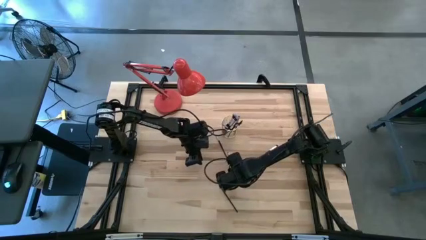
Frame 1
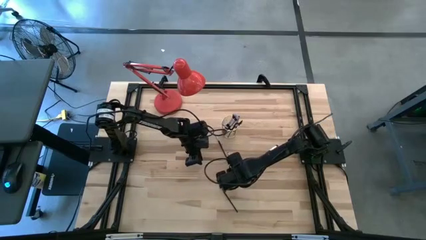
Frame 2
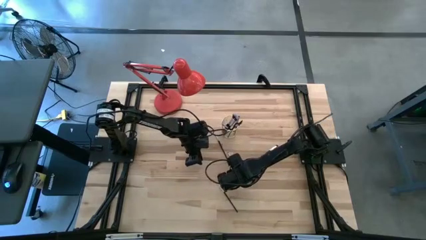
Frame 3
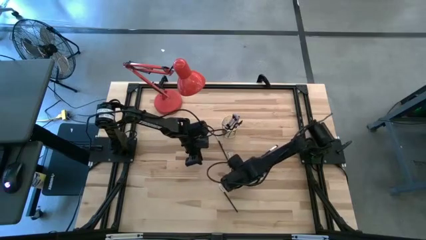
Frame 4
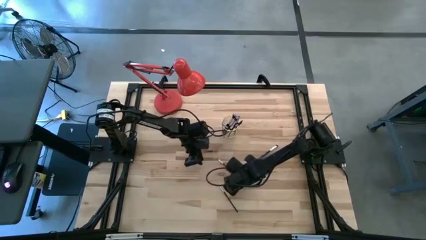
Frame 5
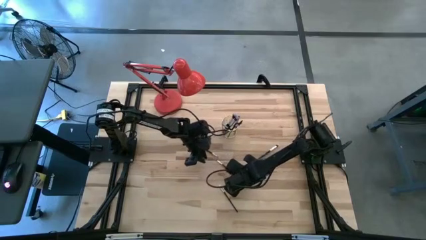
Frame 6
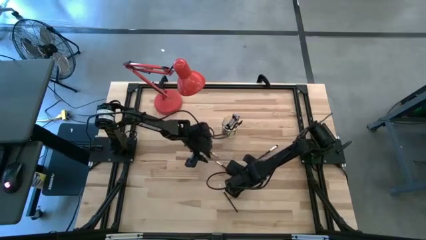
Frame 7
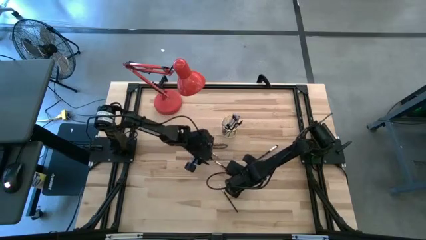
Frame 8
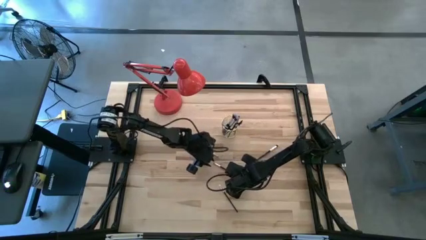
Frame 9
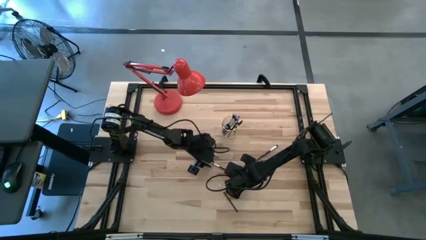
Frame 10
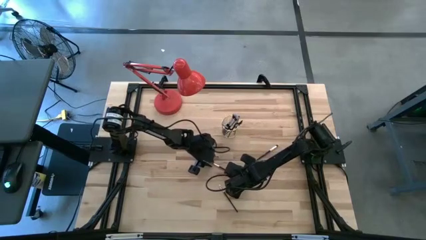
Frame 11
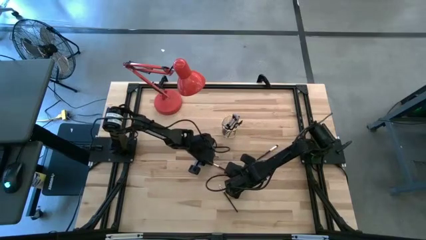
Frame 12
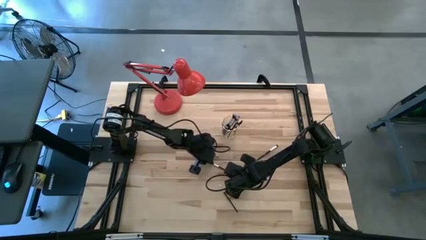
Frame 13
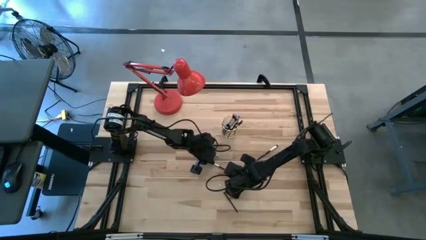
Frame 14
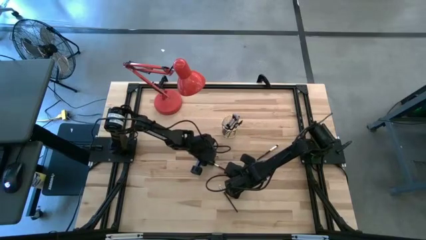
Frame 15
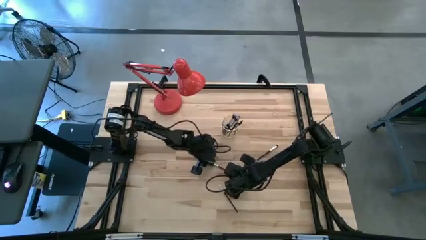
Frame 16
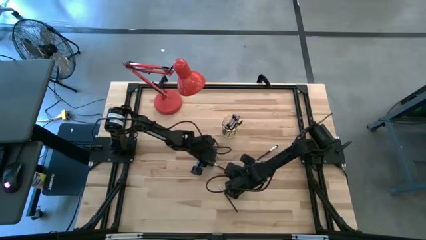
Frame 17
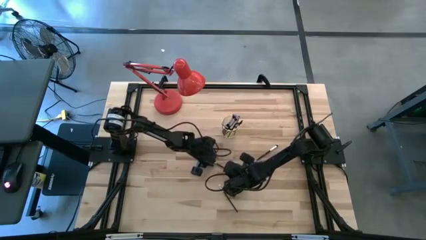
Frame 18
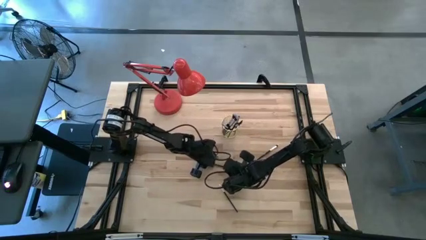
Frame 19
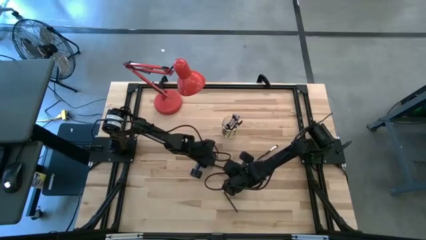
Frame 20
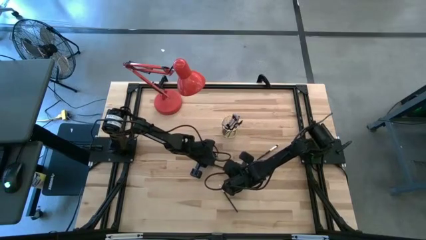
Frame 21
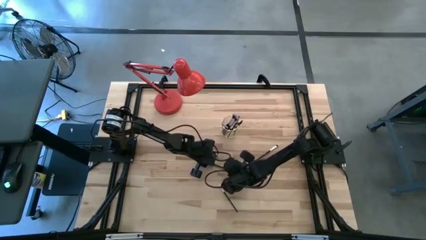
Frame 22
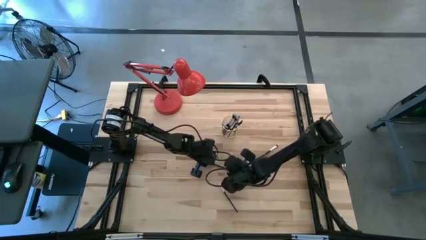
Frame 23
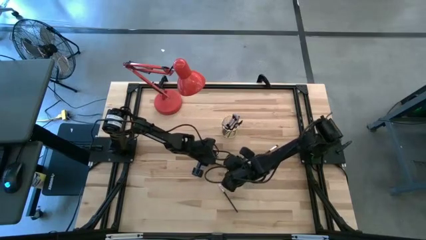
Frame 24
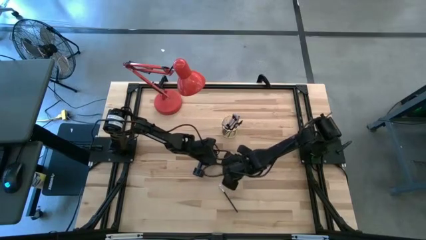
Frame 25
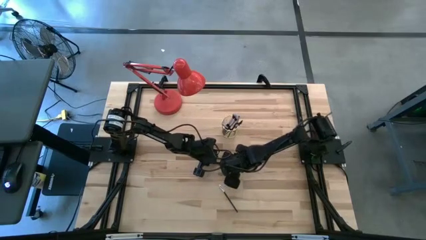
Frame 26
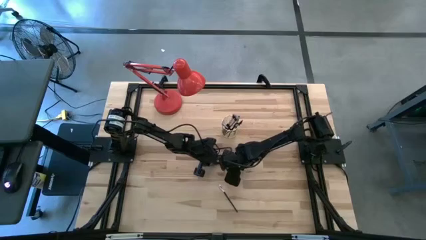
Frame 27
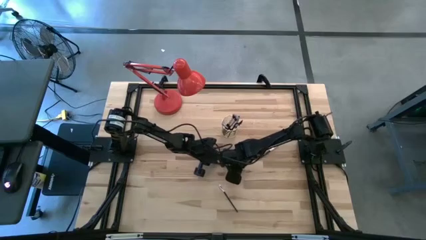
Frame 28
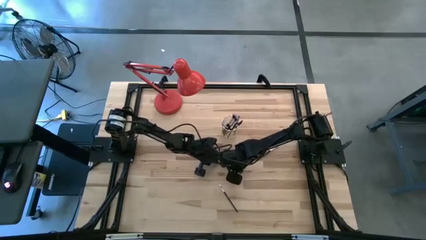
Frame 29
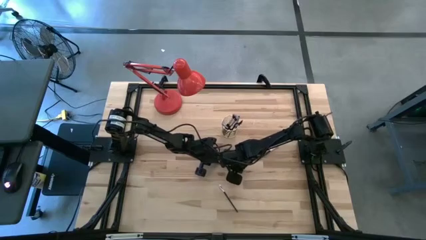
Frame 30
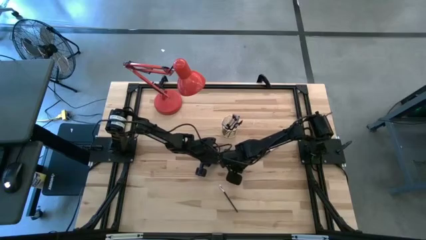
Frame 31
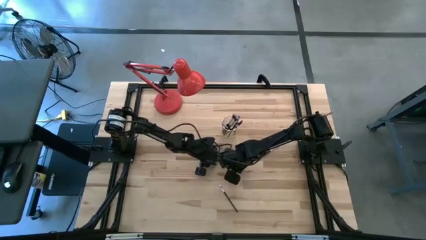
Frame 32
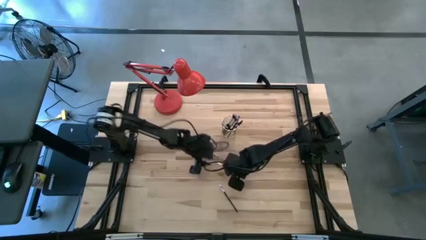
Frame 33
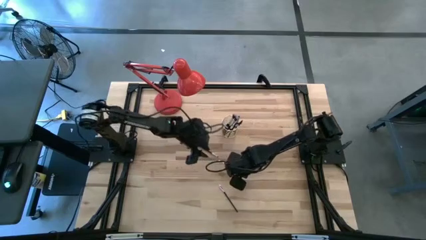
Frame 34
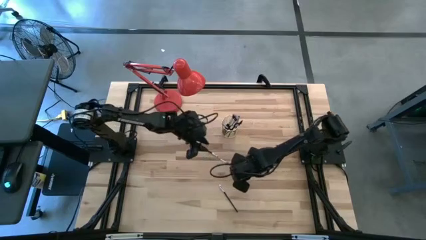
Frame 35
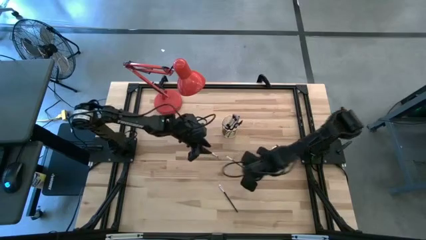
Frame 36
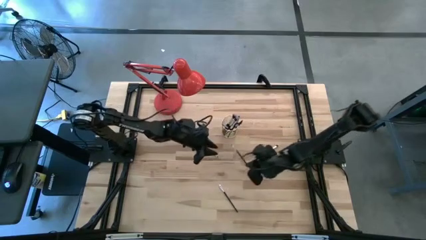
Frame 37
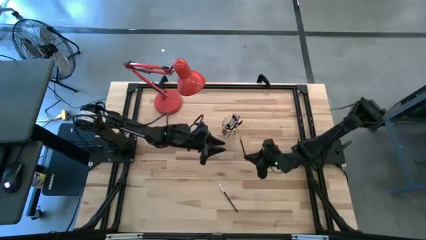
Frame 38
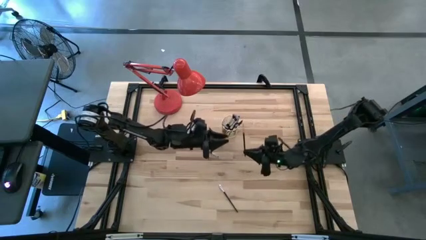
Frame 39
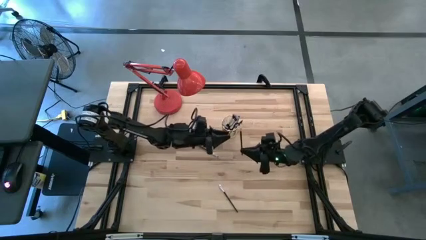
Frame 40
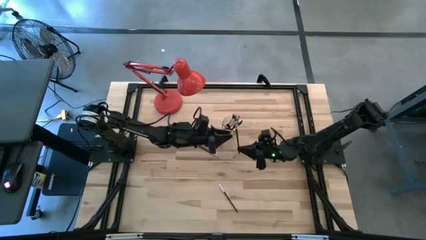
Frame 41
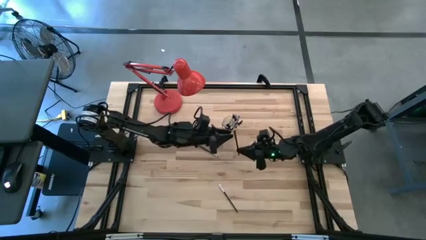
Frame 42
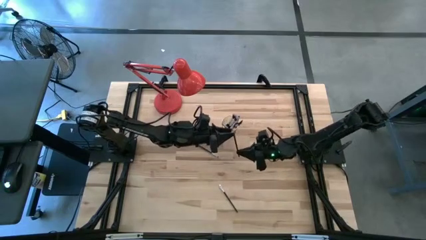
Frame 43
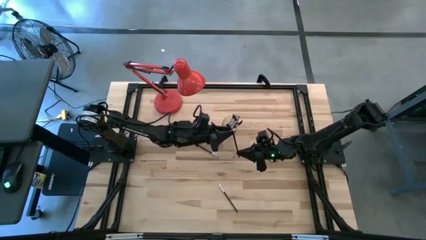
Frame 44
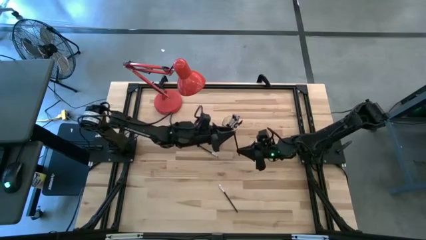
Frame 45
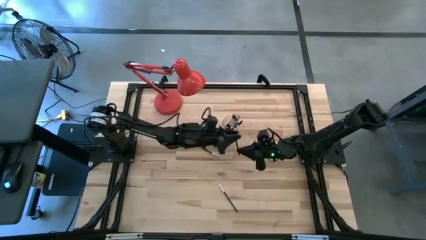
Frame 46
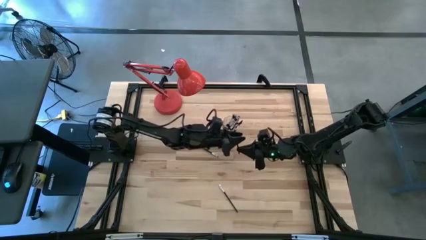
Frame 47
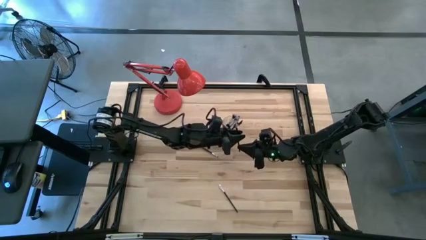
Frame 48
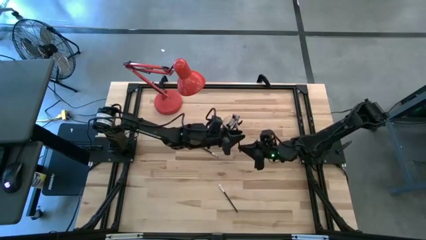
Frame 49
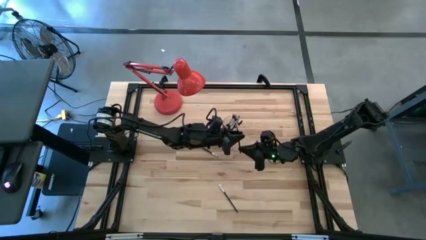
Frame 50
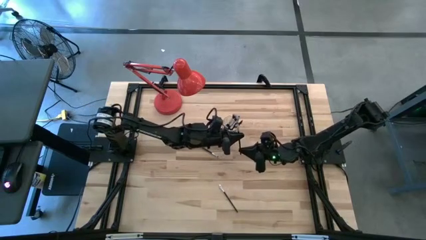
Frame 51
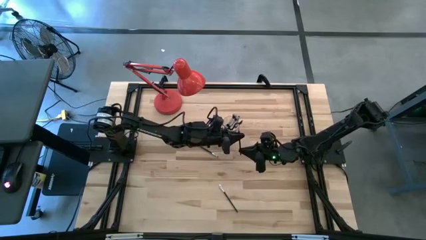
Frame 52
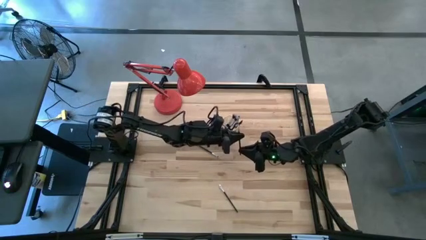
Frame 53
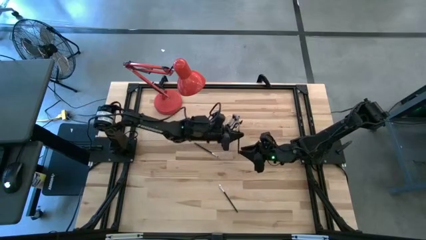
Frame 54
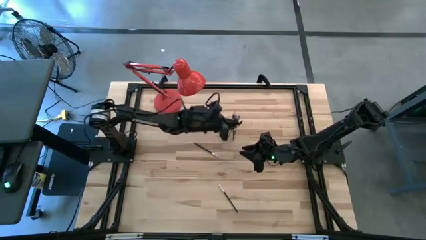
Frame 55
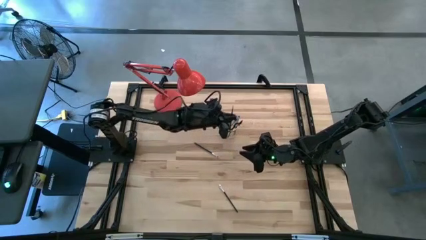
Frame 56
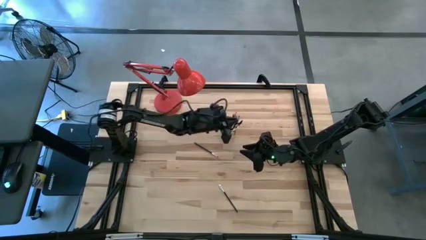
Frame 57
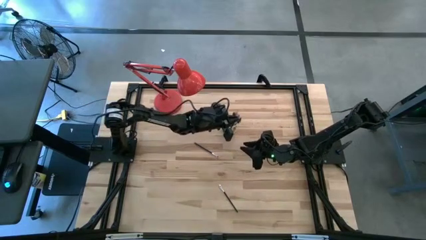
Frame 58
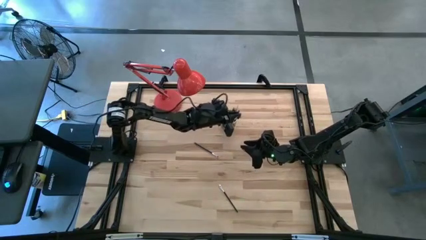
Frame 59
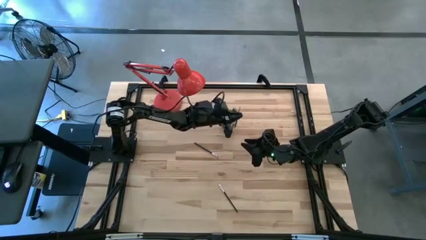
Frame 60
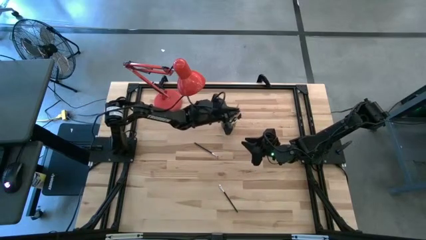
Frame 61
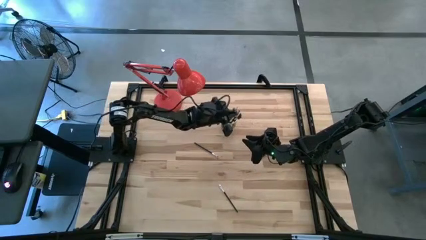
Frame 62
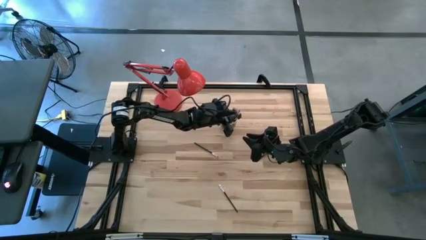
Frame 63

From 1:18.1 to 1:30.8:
Task: Put items in baskets/containers
Put the black eyeshadow brush into the yellow container

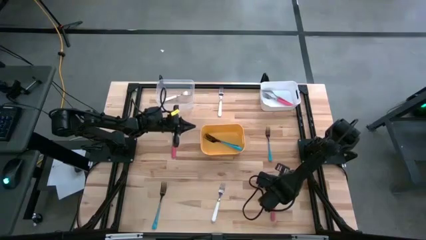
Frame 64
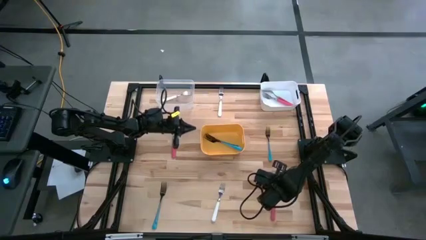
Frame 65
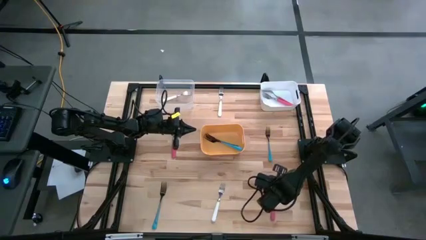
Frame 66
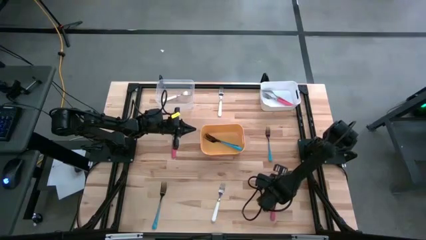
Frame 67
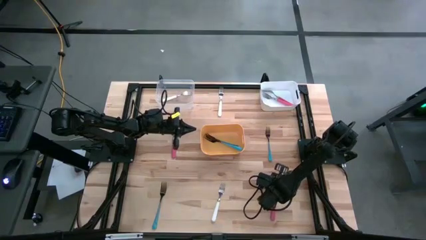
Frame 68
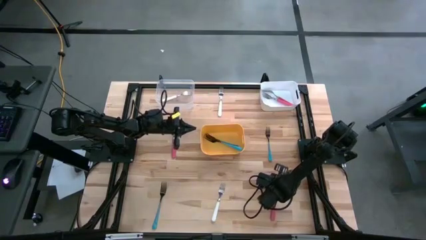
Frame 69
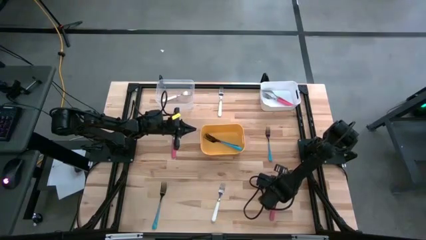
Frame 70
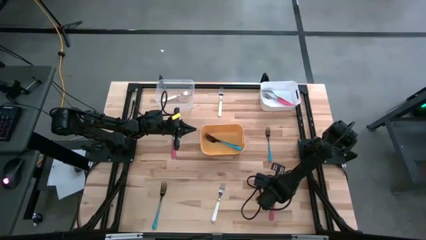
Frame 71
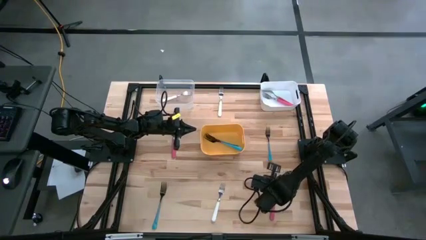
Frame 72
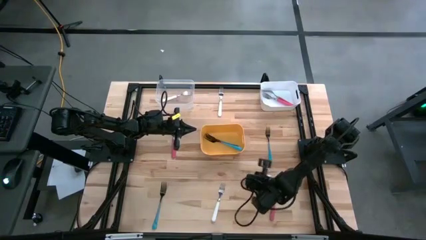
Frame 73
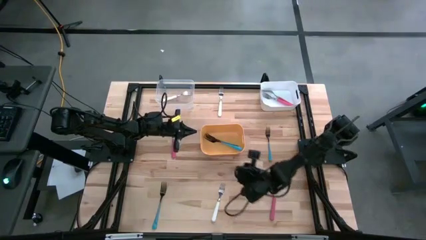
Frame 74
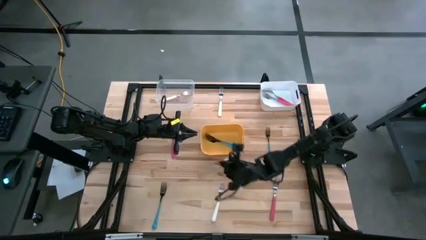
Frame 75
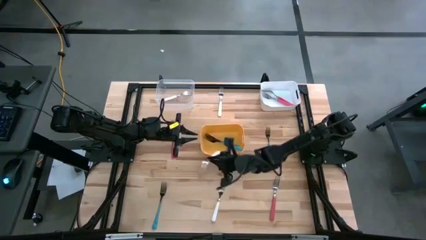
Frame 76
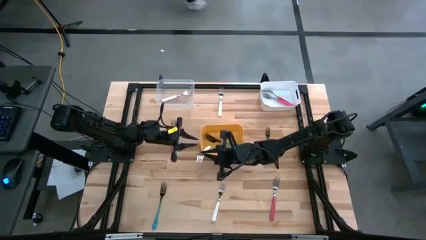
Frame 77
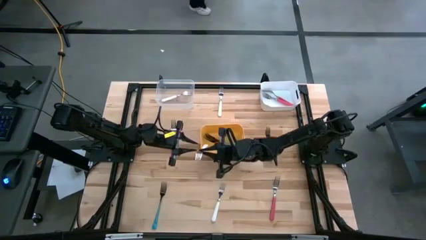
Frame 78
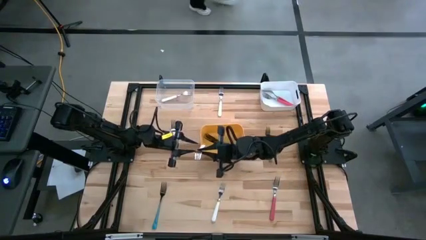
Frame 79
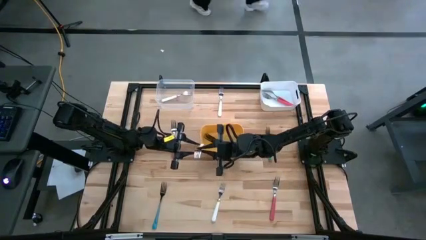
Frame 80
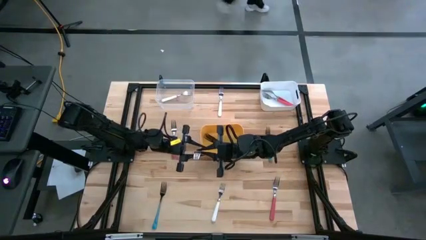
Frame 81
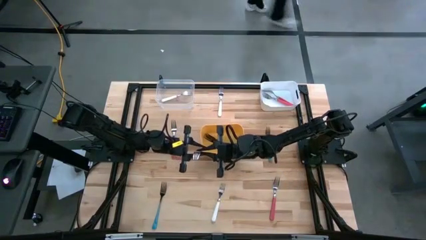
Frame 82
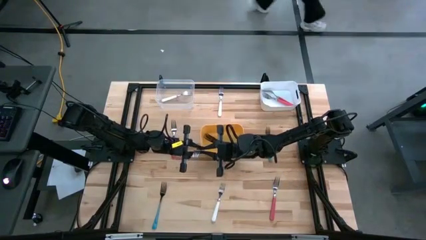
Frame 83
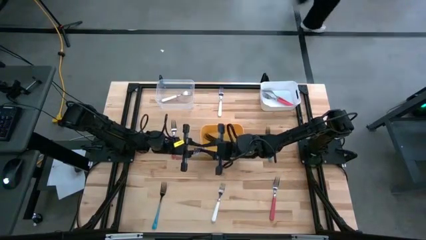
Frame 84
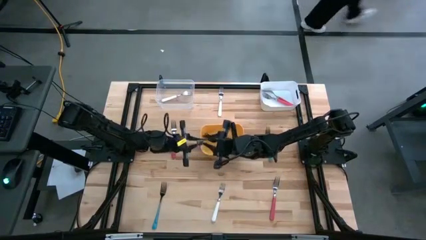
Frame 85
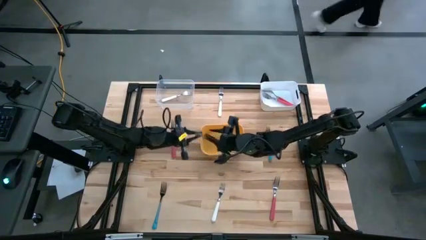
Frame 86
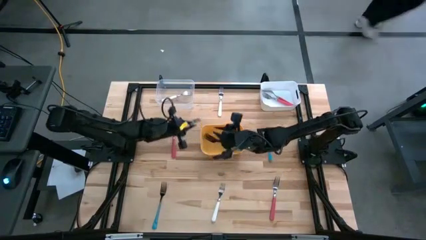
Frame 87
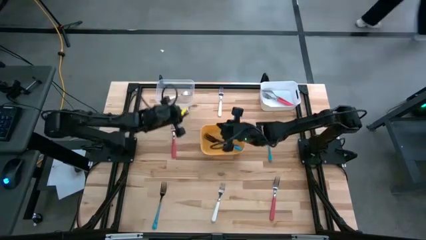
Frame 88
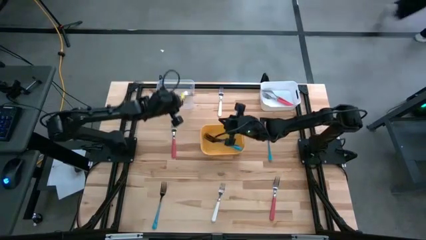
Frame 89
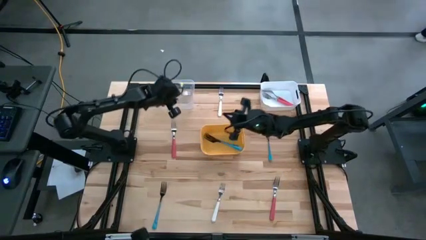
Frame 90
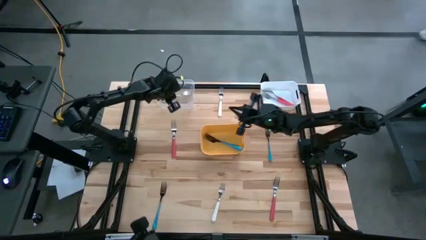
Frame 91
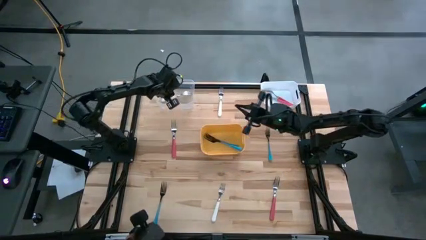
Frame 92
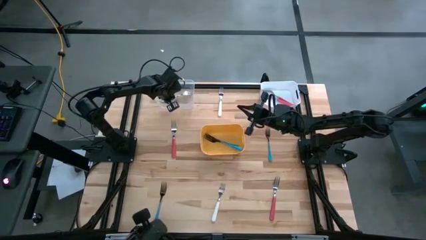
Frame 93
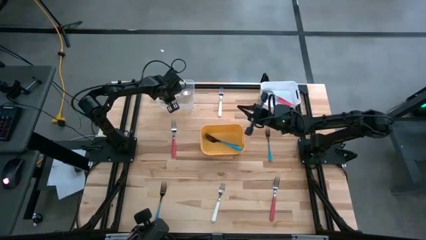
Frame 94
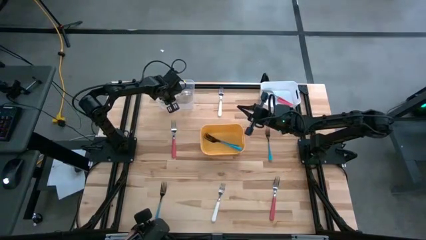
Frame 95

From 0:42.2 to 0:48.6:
Task: Sort silverware by color (type)
Put the white fork into the transparent bin
